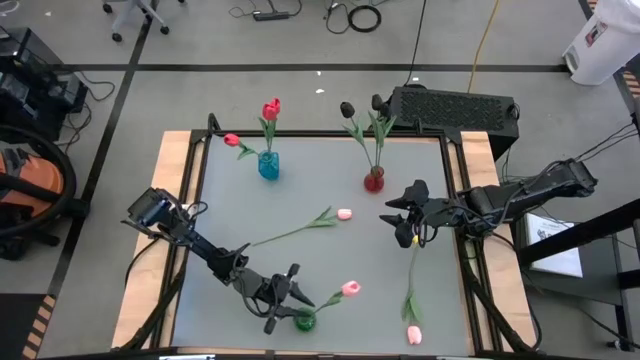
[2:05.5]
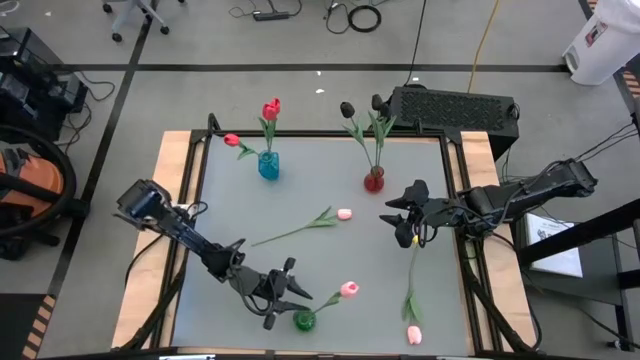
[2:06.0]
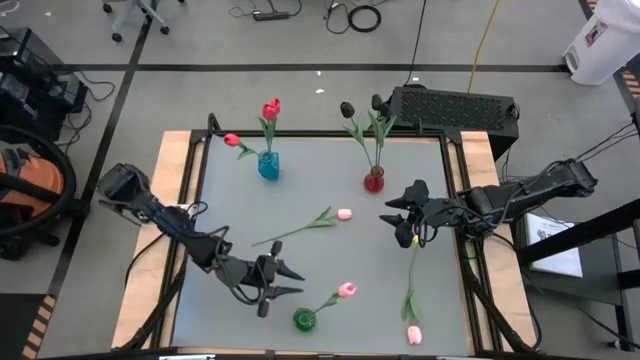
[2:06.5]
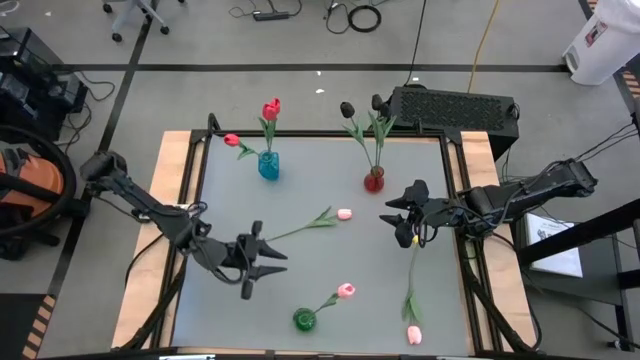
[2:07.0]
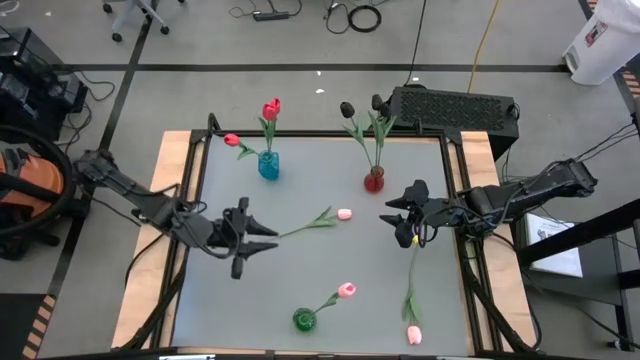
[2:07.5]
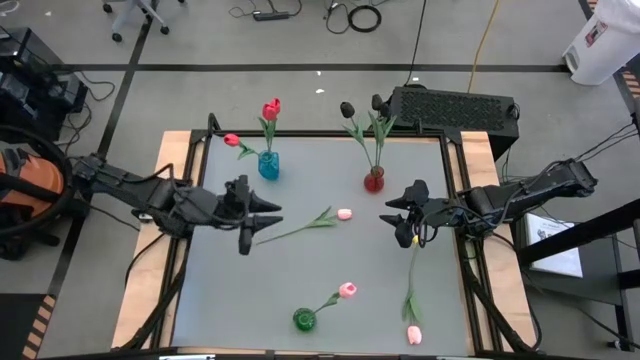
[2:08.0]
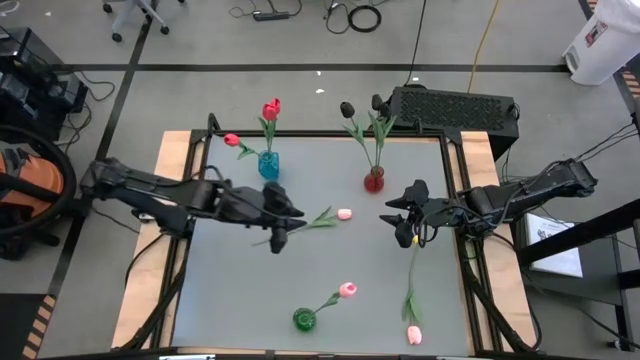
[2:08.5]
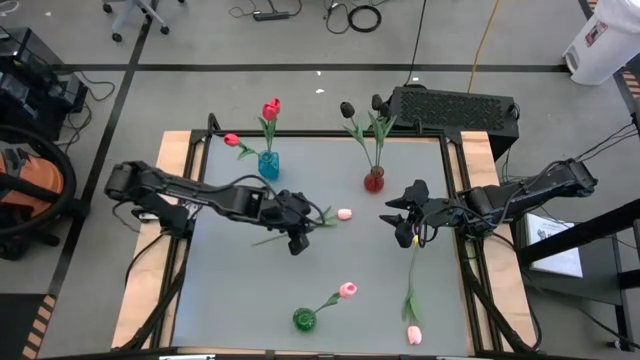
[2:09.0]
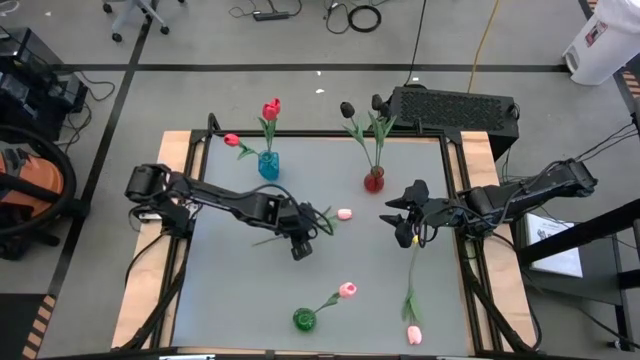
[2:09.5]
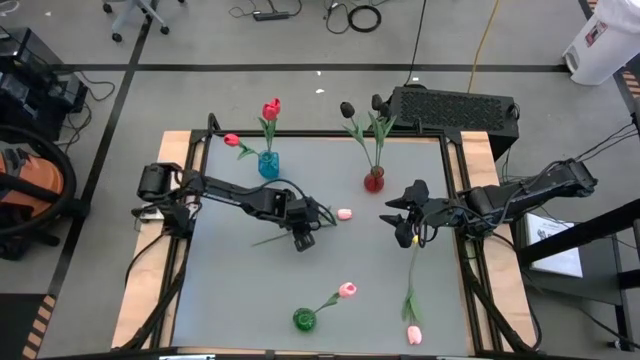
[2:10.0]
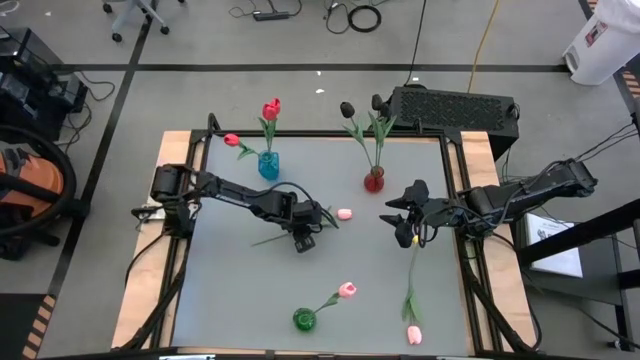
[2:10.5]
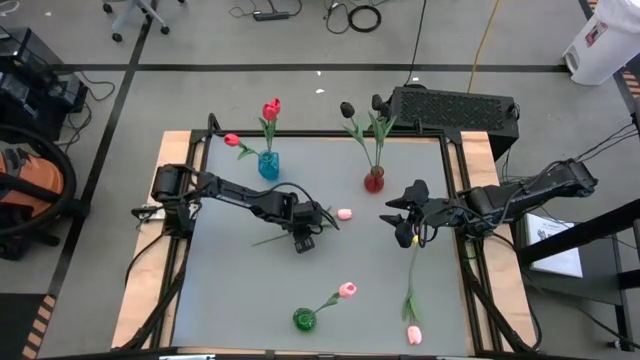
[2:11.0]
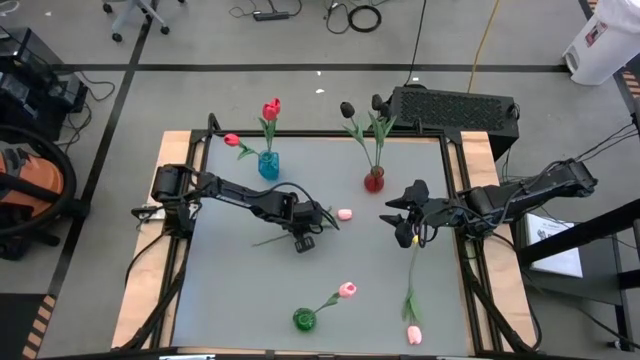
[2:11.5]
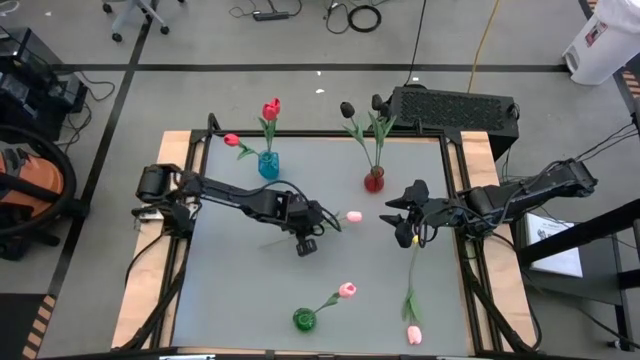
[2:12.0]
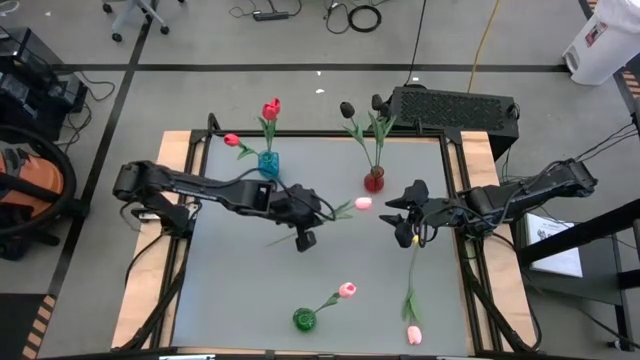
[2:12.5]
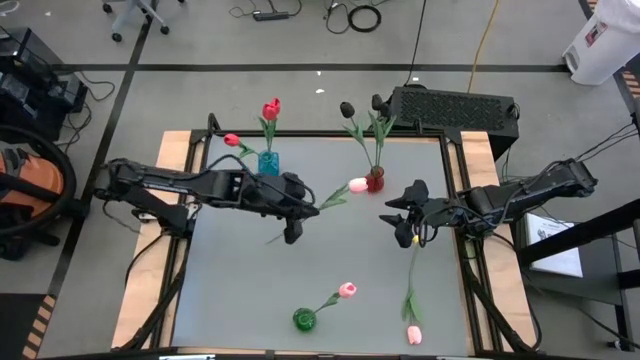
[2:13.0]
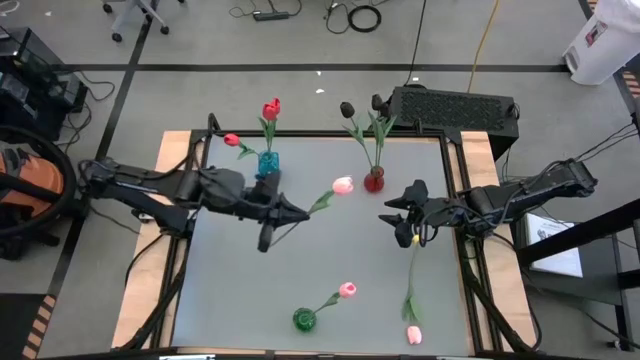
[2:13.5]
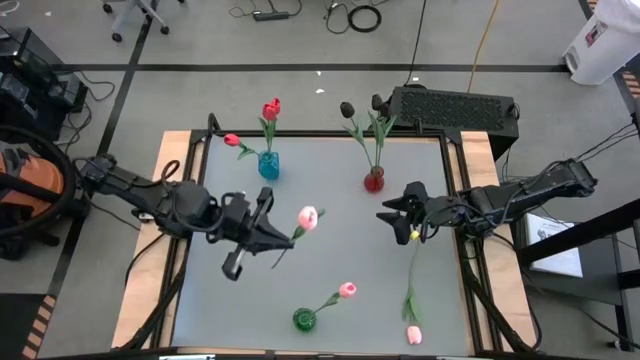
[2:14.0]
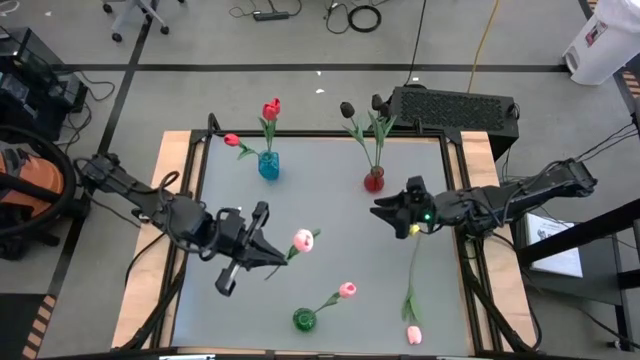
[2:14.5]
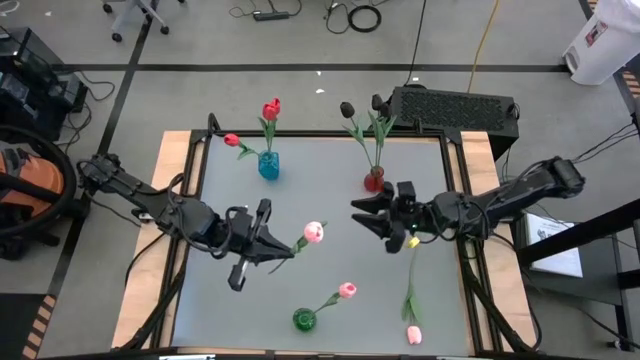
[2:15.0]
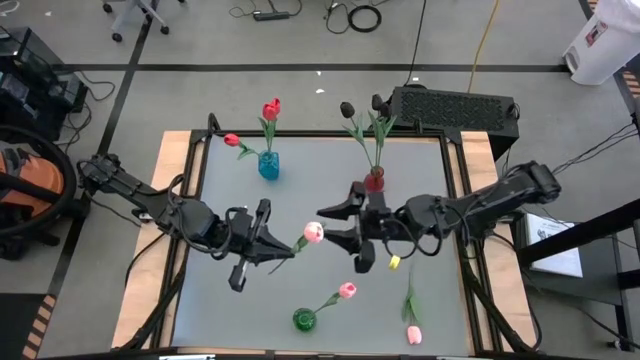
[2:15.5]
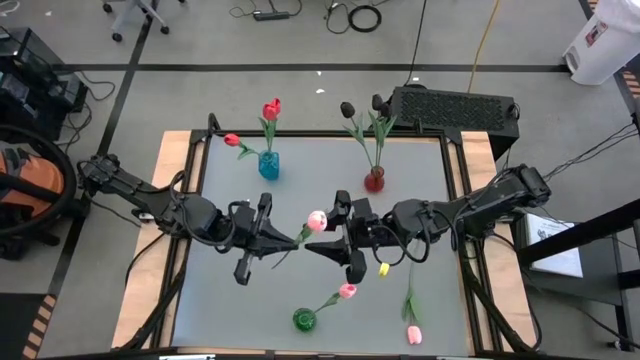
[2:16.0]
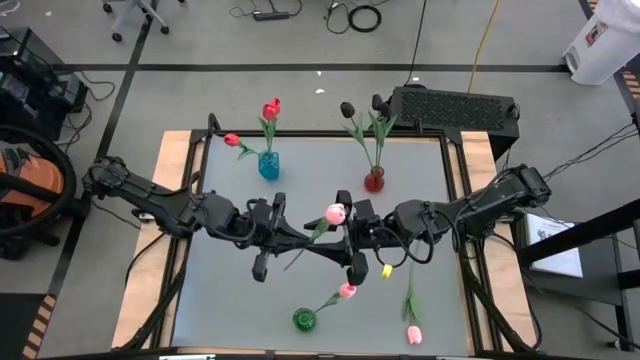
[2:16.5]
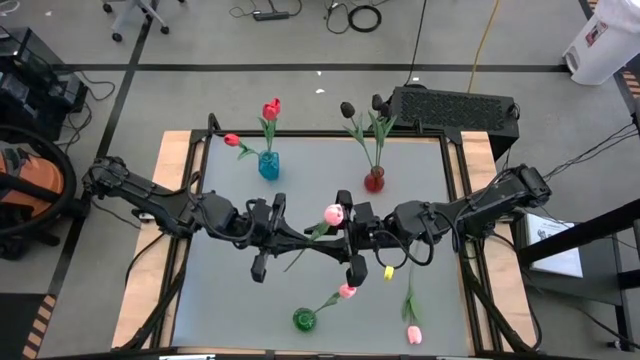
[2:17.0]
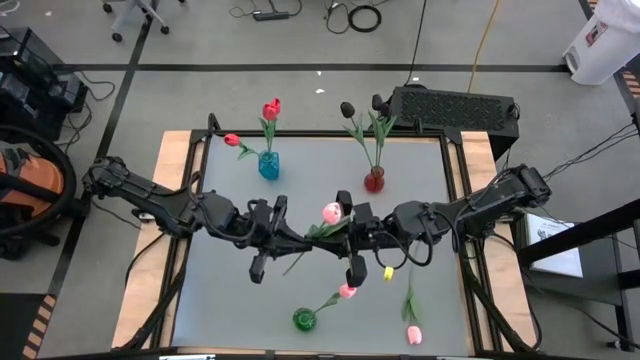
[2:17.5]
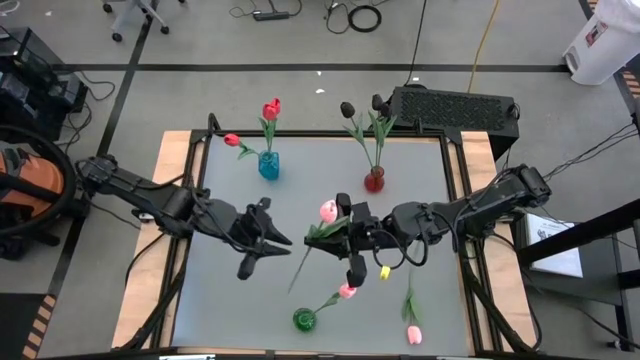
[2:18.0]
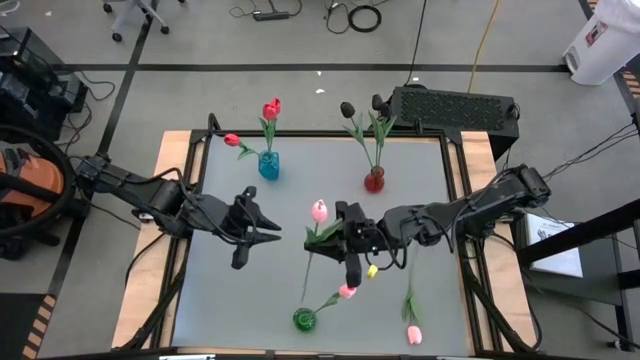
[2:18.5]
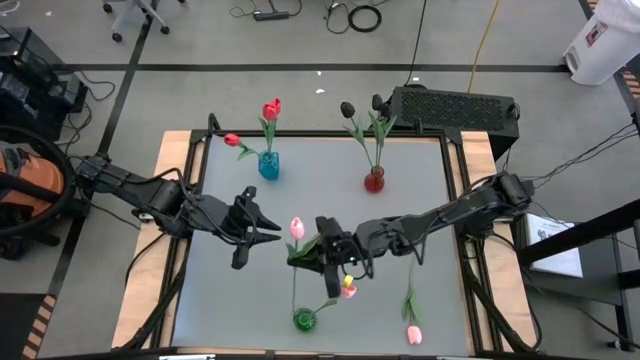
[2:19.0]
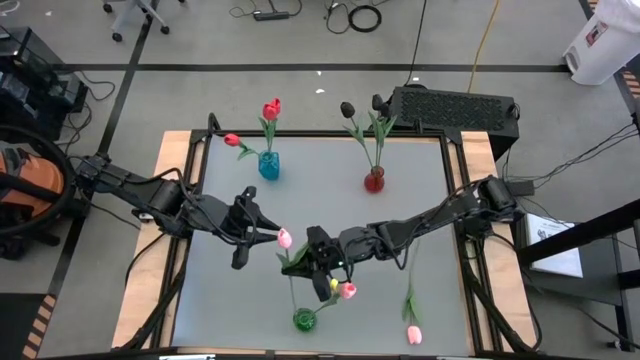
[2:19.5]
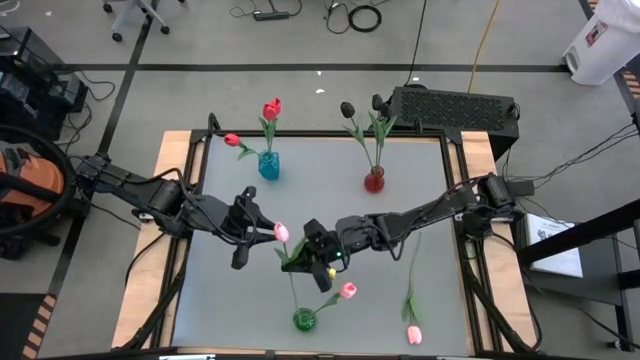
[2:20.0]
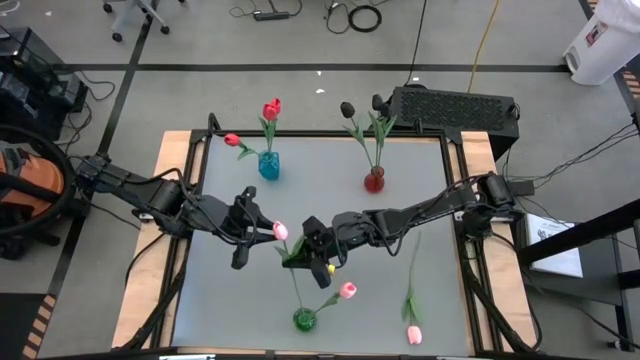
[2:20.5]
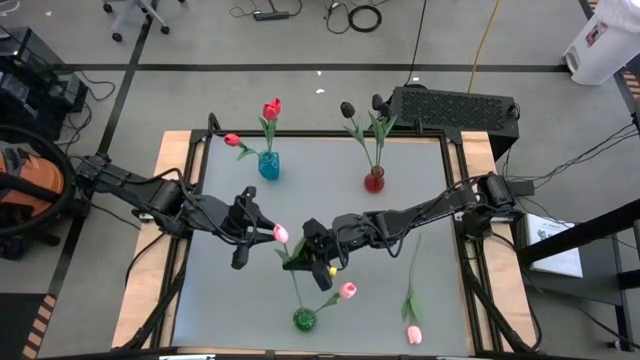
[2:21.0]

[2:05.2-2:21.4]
Task: Sort flowers into vase by color
Put the top pink tulip into the green vase

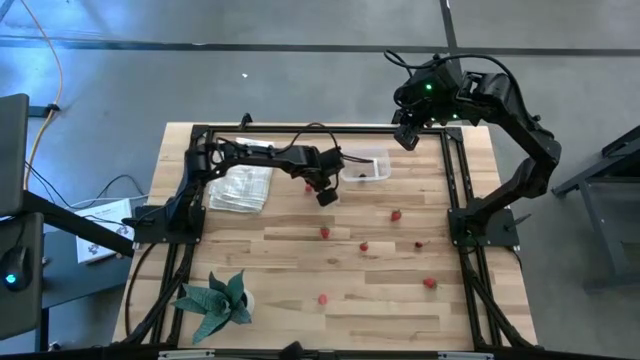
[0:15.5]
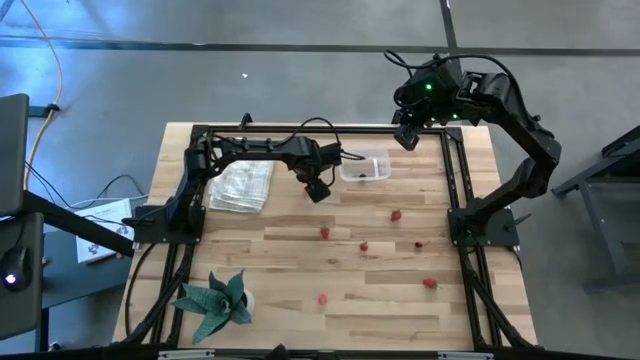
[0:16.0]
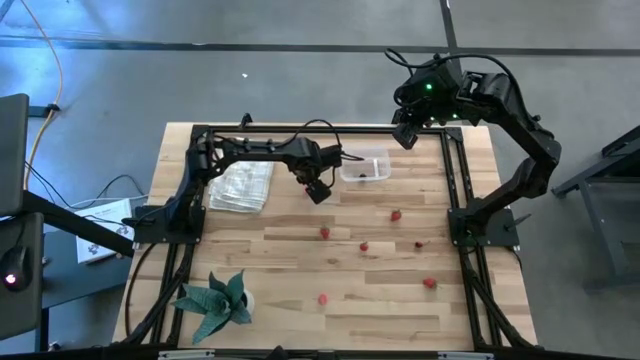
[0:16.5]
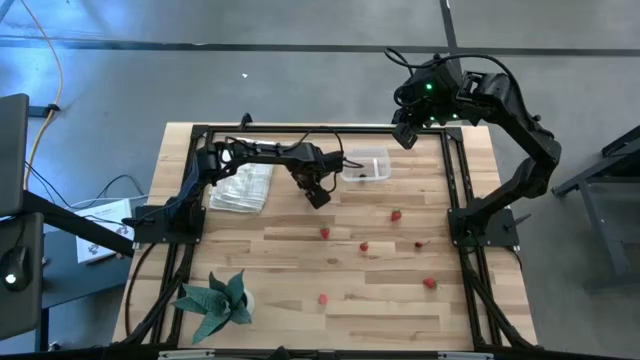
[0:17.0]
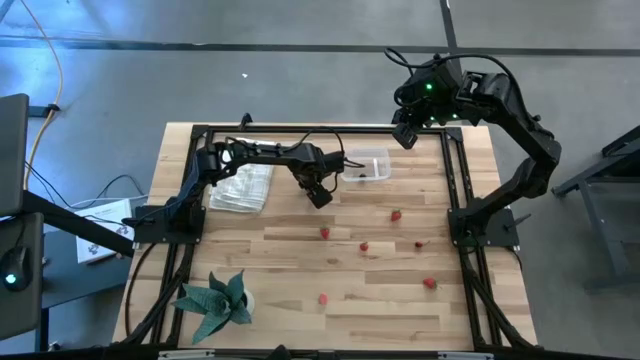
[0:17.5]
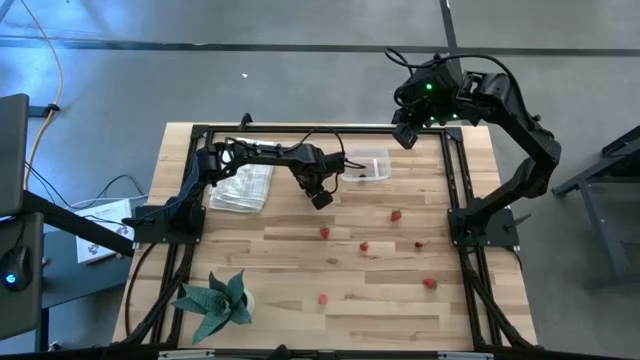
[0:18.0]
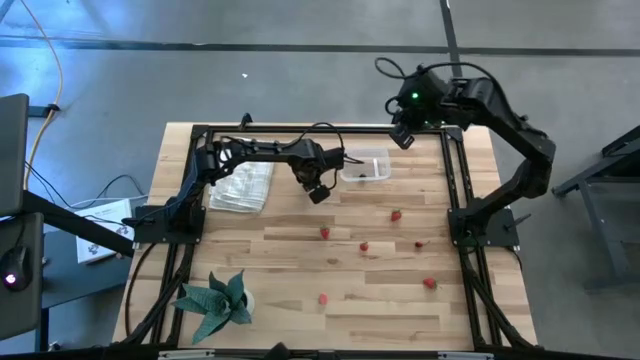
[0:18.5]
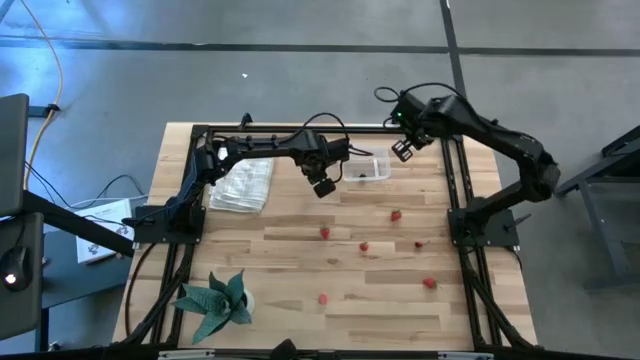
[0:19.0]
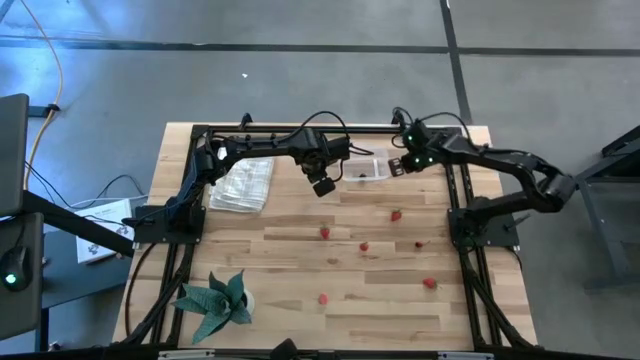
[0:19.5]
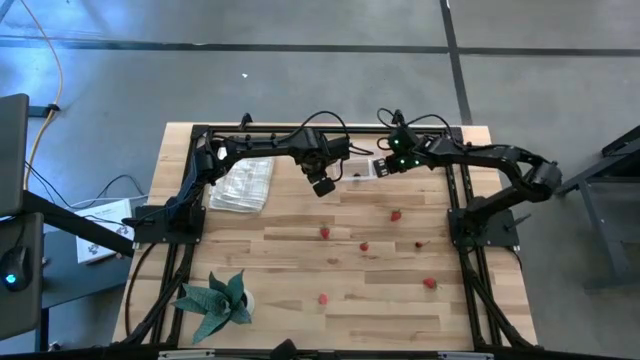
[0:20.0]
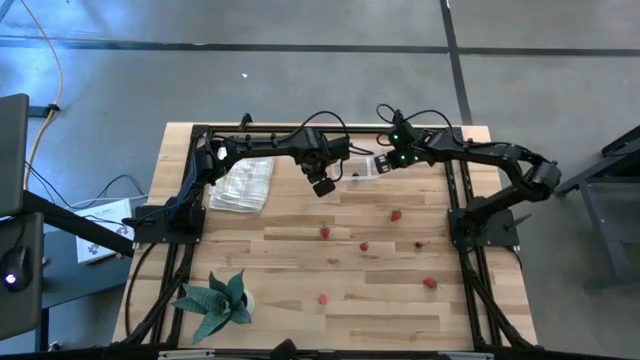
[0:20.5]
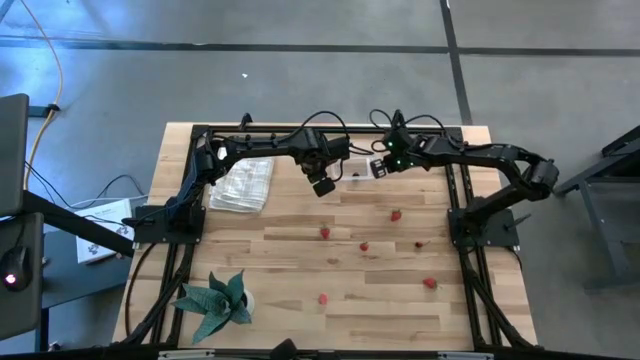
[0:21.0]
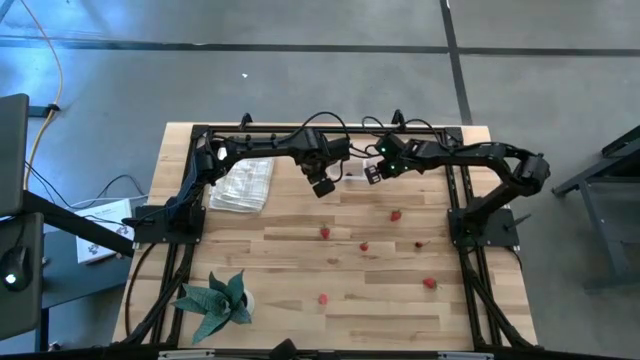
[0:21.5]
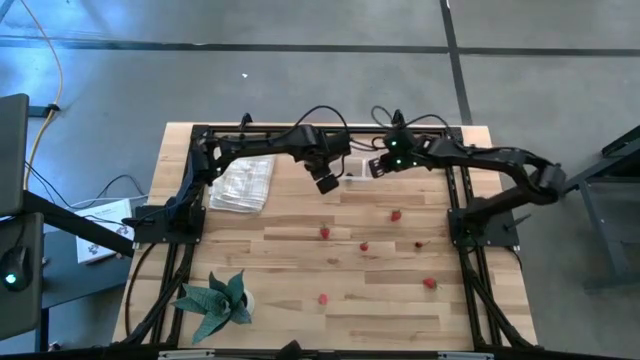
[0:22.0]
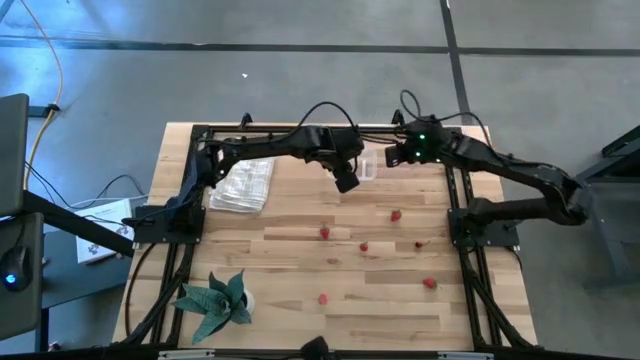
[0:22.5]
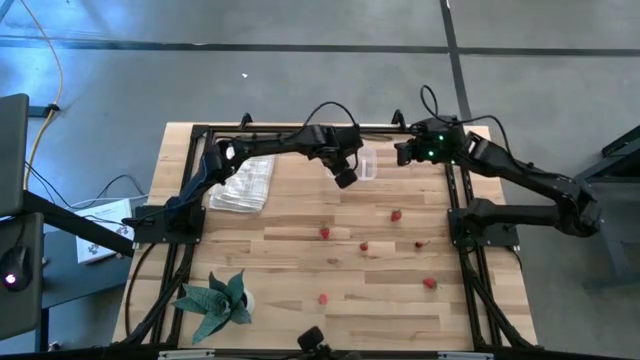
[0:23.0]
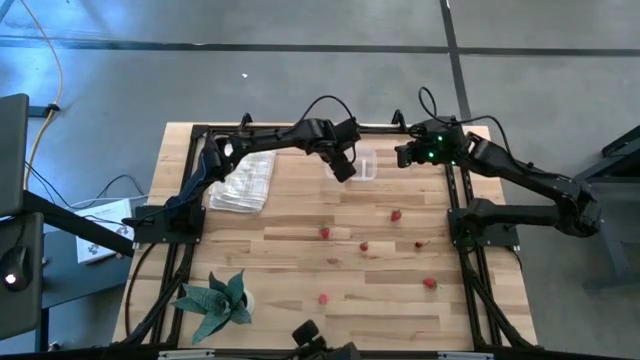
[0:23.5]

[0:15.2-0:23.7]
Task: Pick and placing Produce into tupperware
Put the red raspberry into the transparent container
